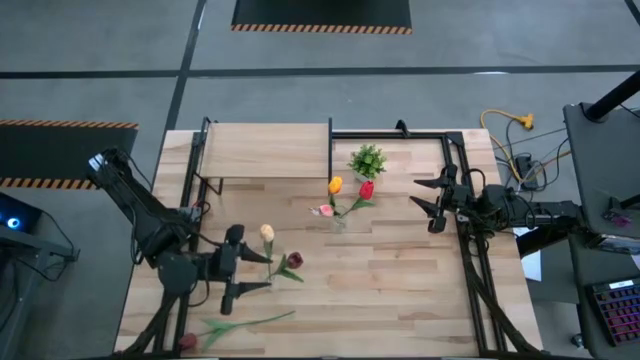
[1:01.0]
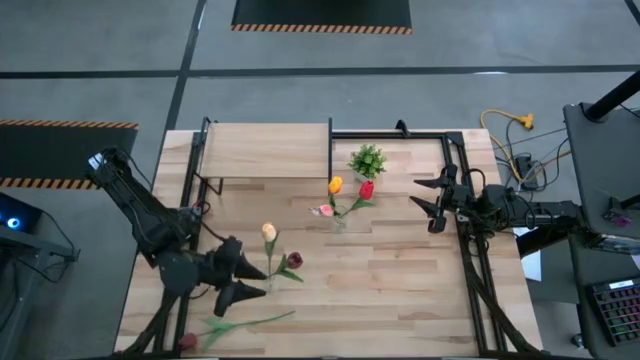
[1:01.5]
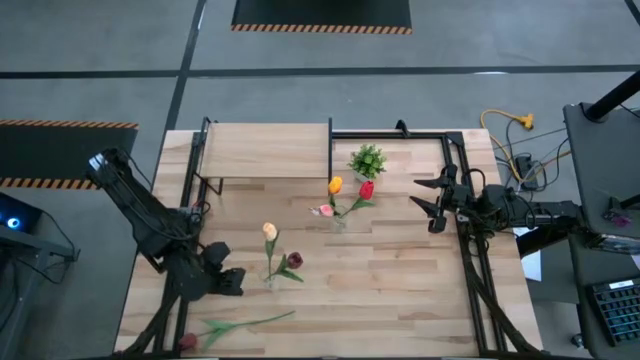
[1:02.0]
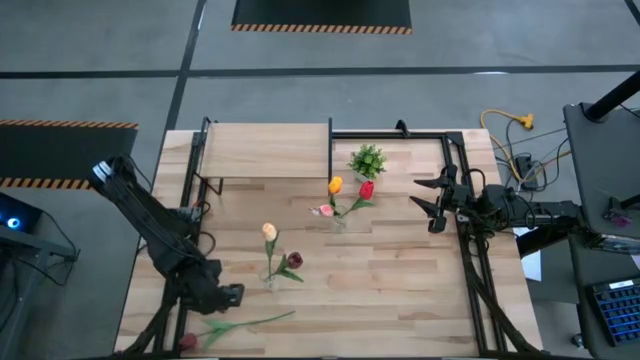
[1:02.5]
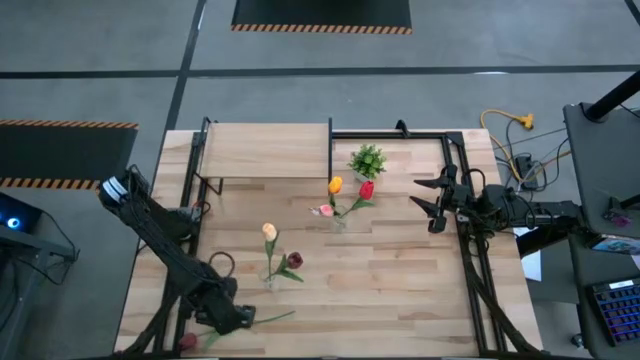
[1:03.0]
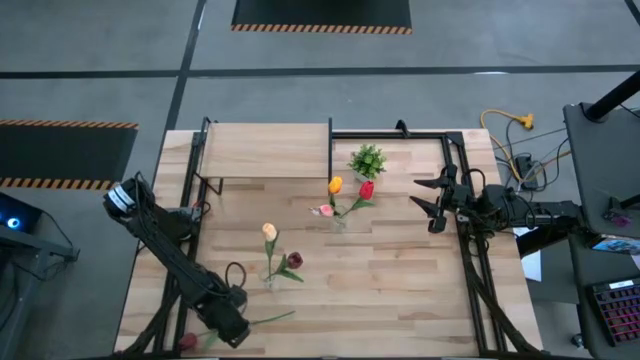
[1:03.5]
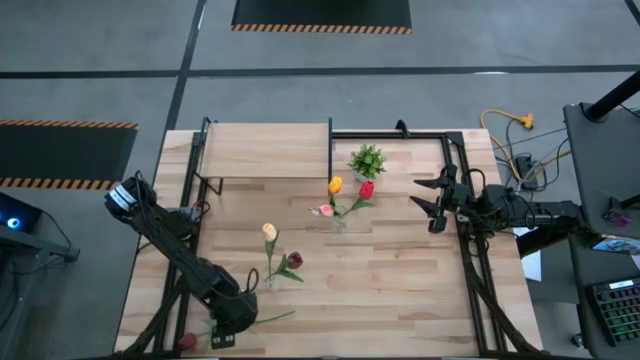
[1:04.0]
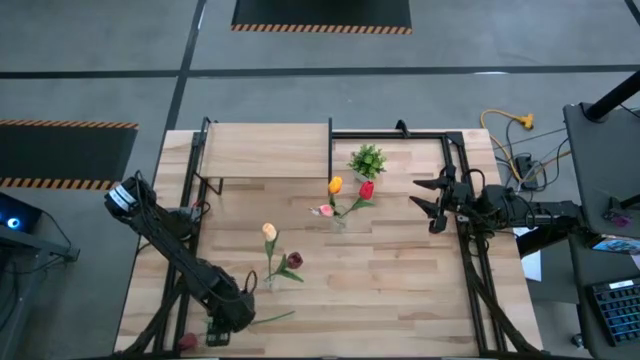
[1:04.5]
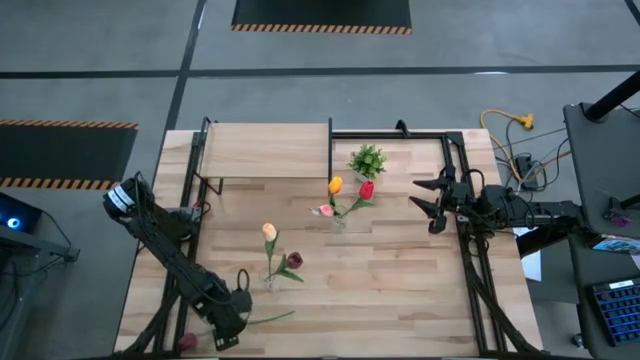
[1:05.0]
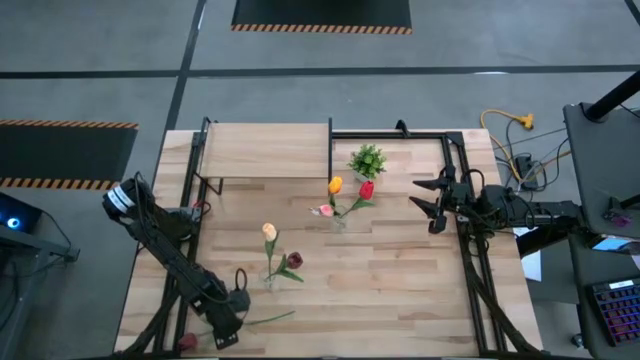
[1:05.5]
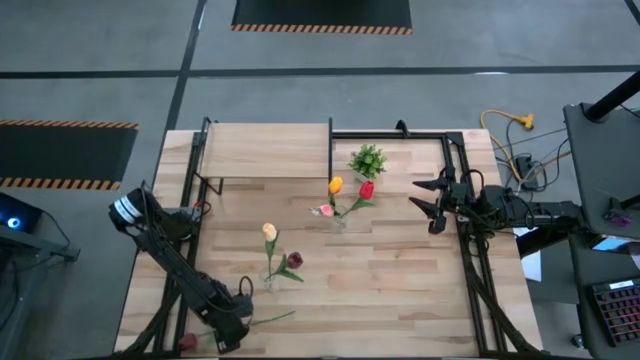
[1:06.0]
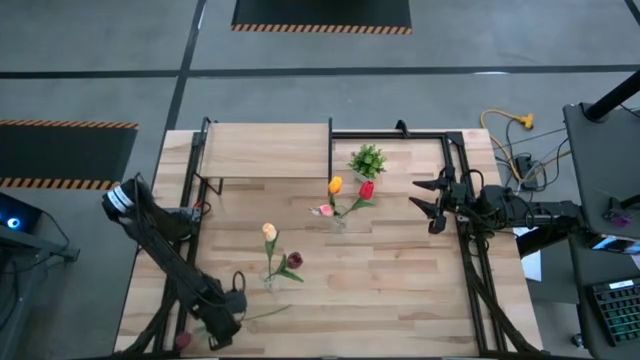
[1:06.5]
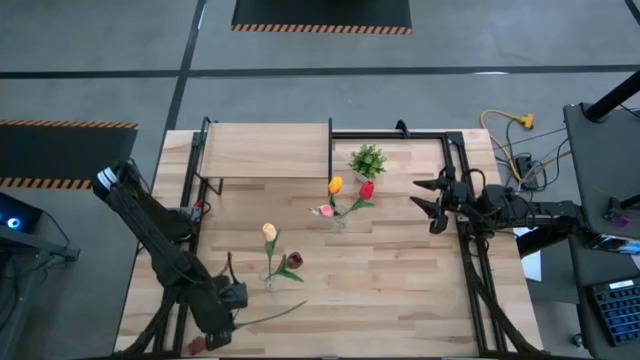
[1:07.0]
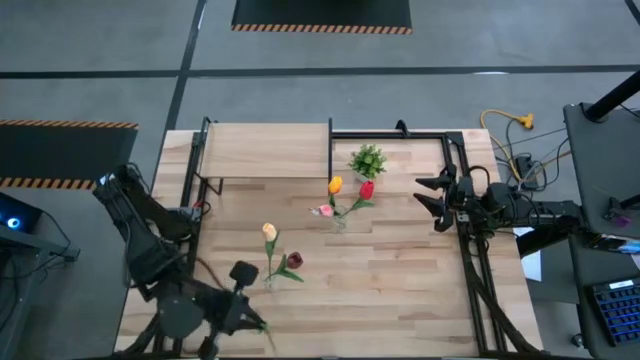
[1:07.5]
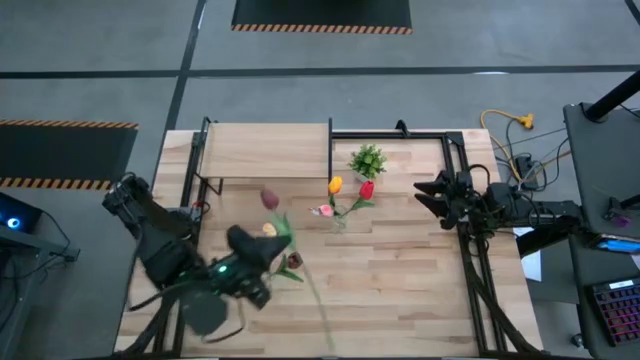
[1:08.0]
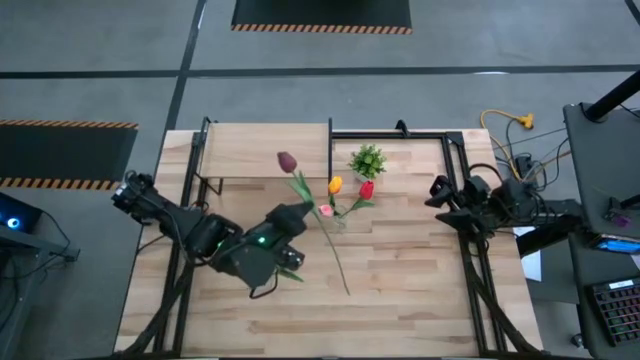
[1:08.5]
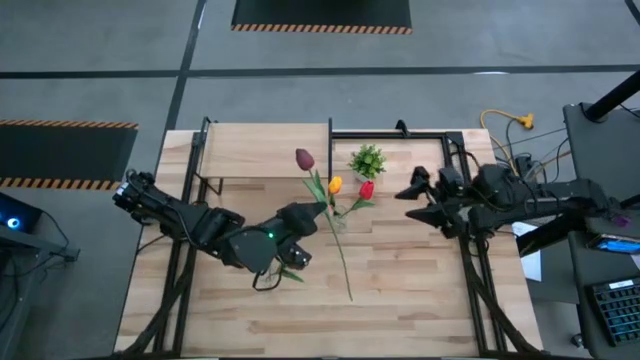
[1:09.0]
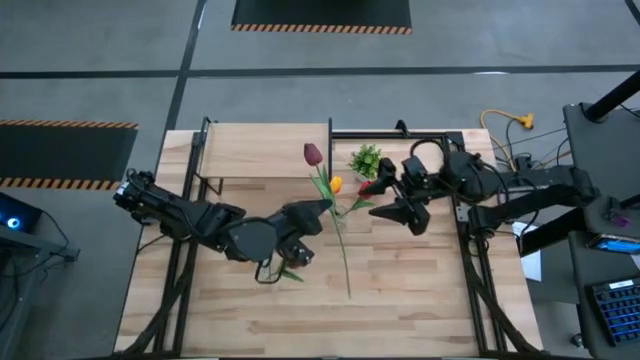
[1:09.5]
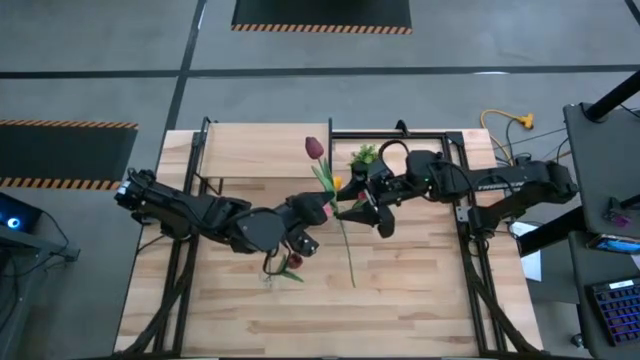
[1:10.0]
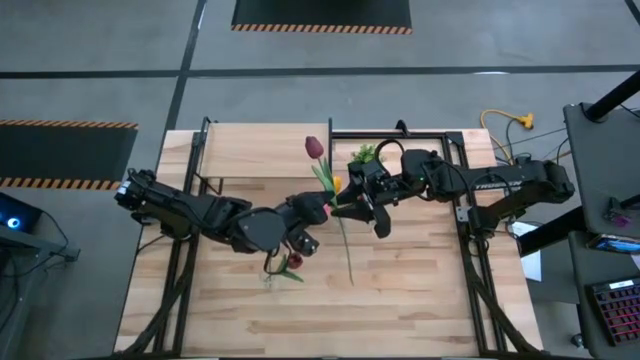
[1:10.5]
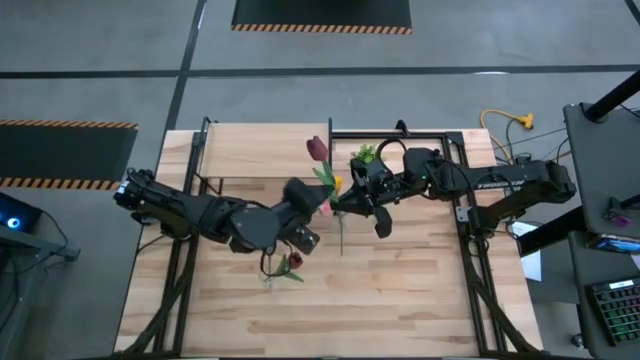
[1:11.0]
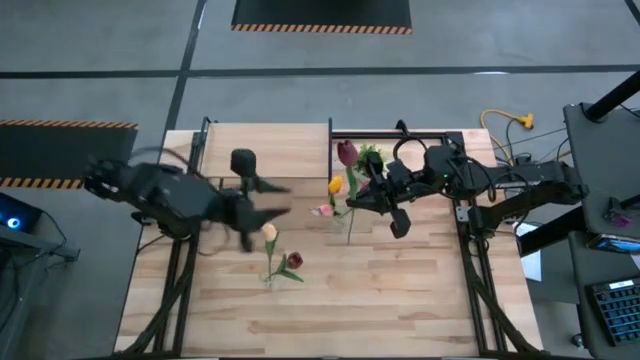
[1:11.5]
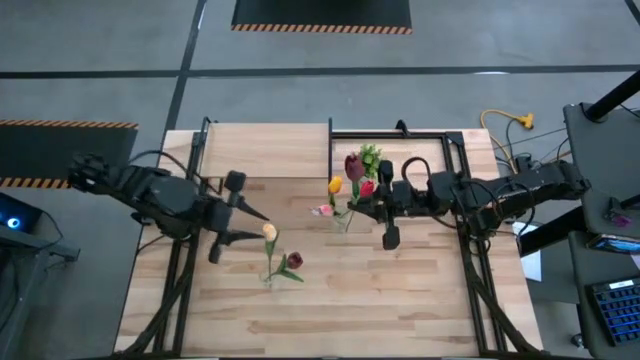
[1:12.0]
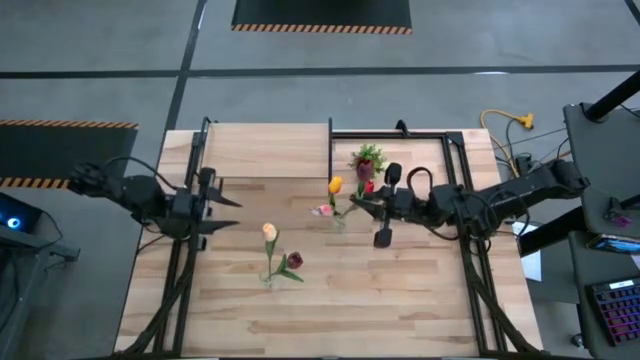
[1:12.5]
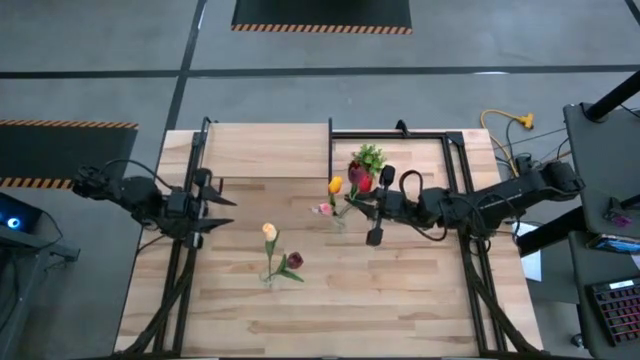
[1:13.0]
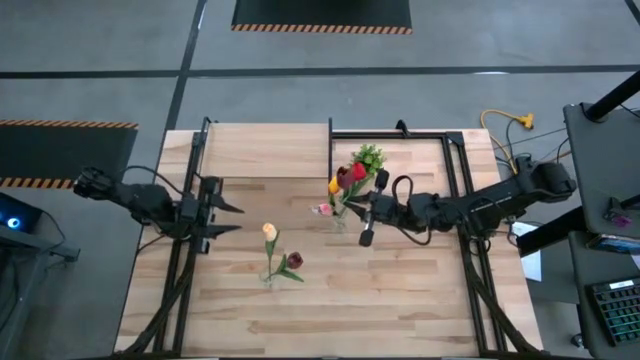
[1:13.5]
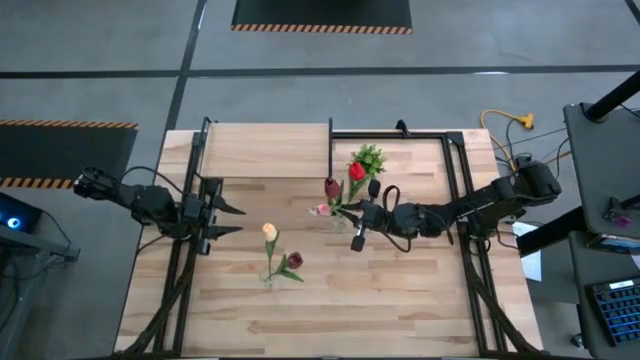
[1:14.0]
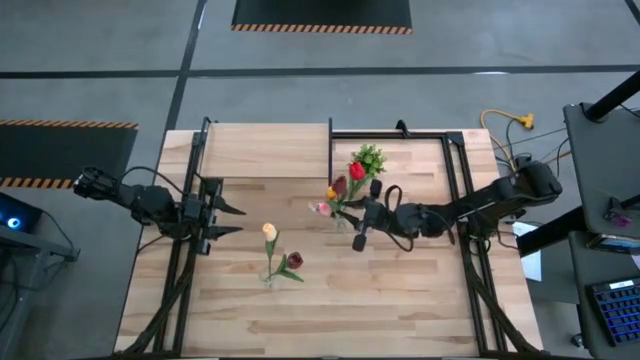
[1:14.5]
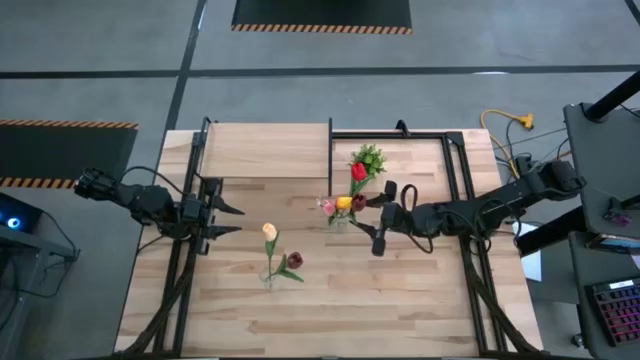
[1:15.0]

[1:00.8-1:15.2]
Task: Pick and place flowers into a vace then onto a shelf
Put the dark red tulip into the top transparent flower vase

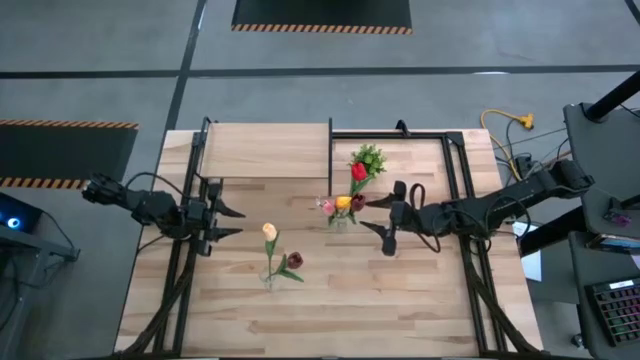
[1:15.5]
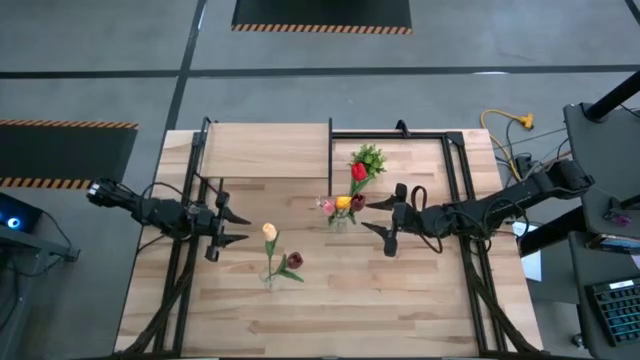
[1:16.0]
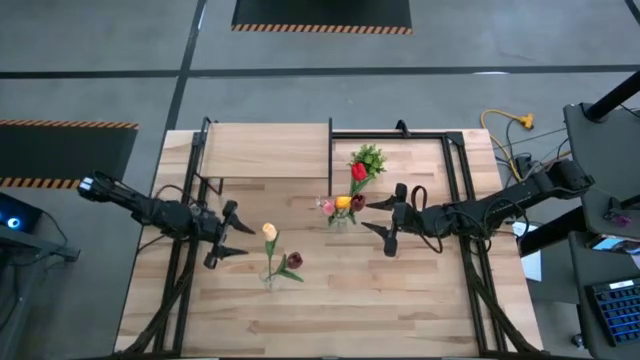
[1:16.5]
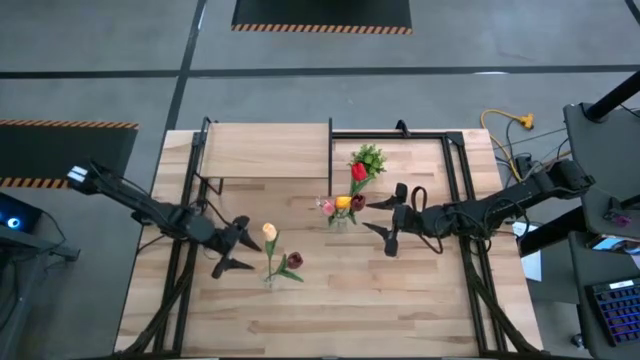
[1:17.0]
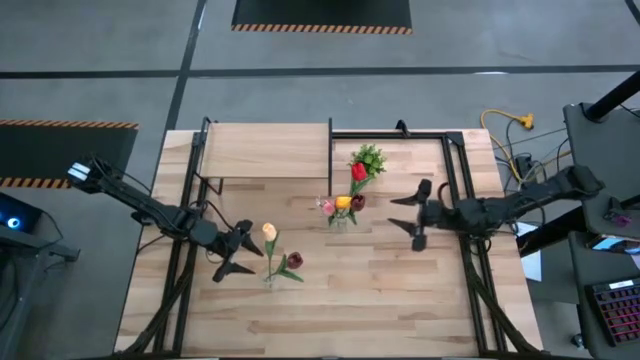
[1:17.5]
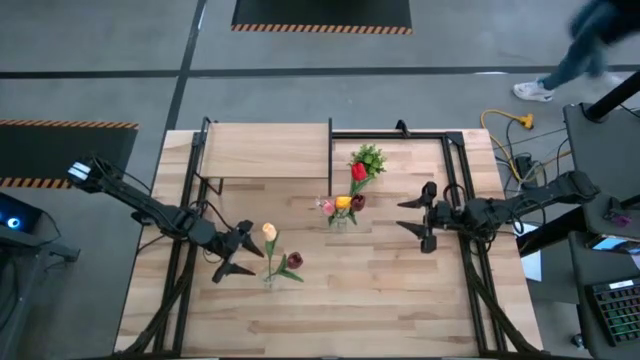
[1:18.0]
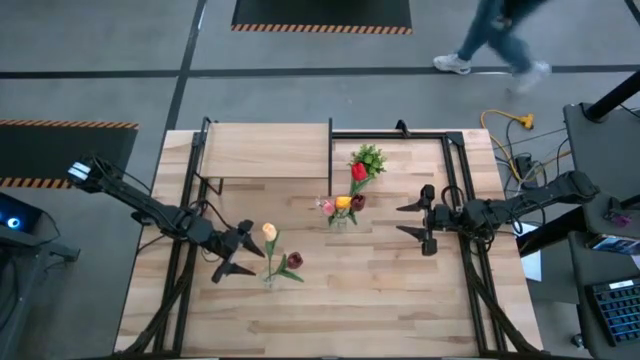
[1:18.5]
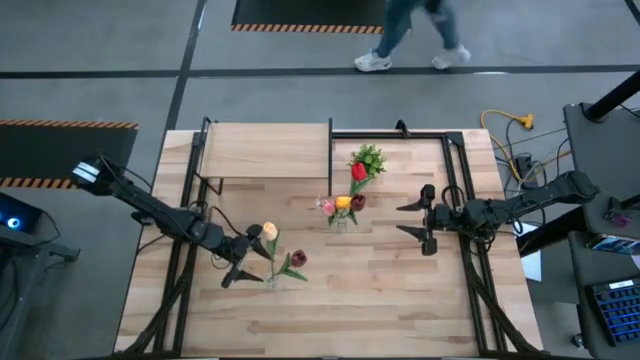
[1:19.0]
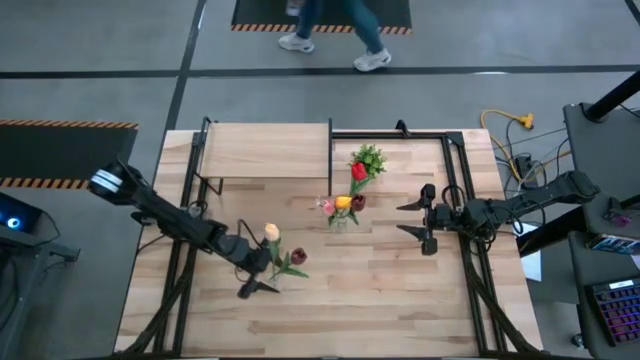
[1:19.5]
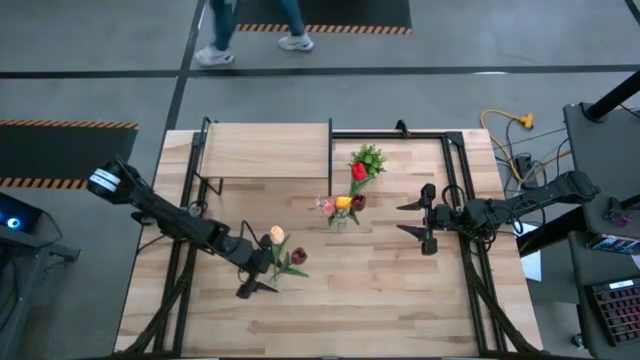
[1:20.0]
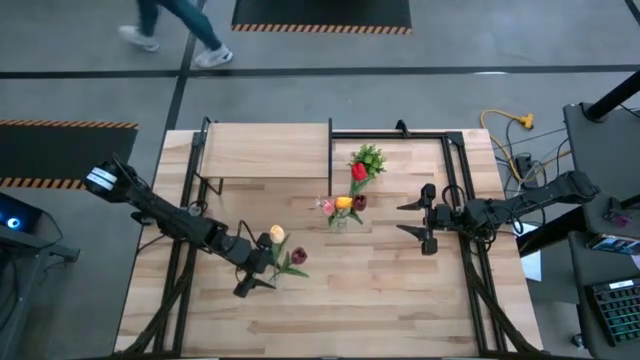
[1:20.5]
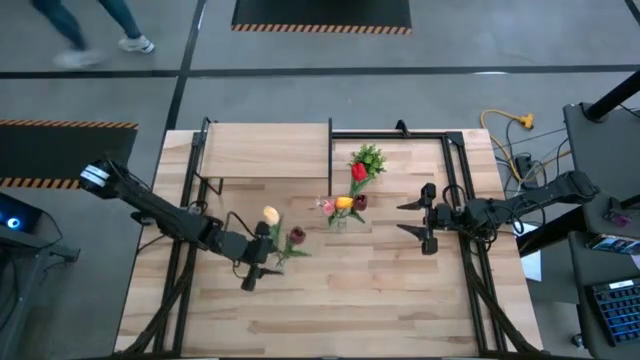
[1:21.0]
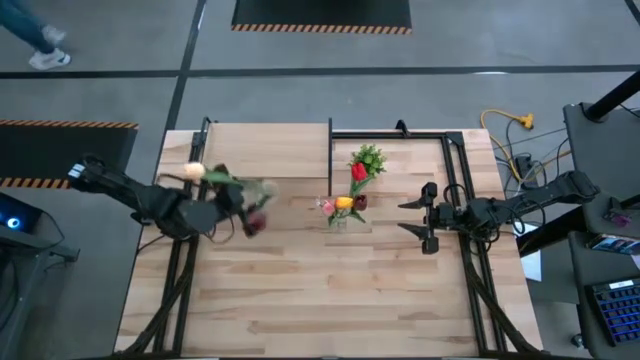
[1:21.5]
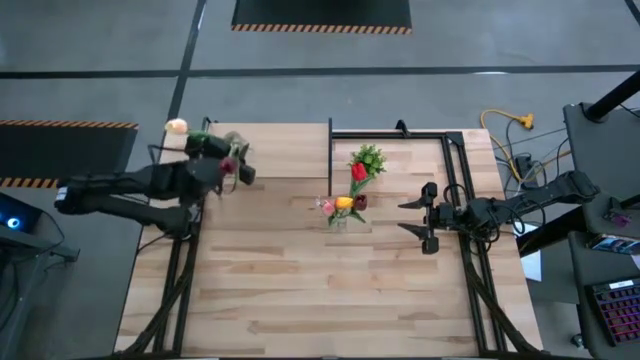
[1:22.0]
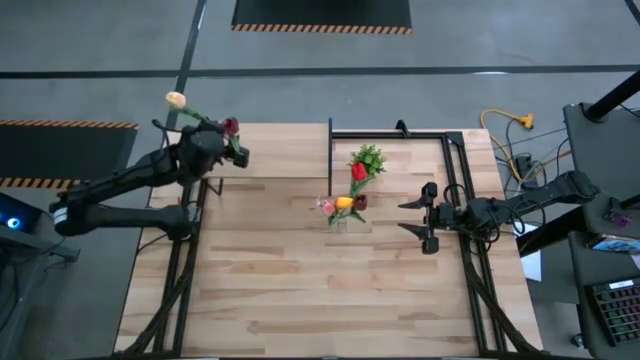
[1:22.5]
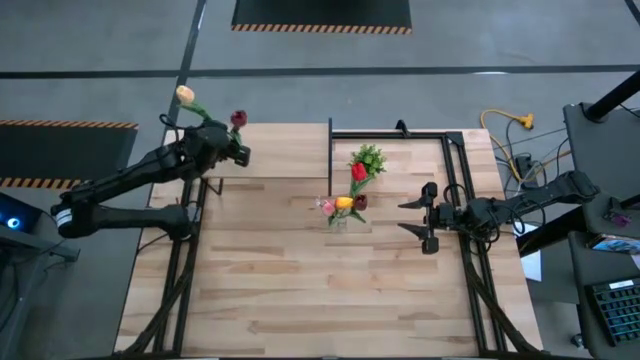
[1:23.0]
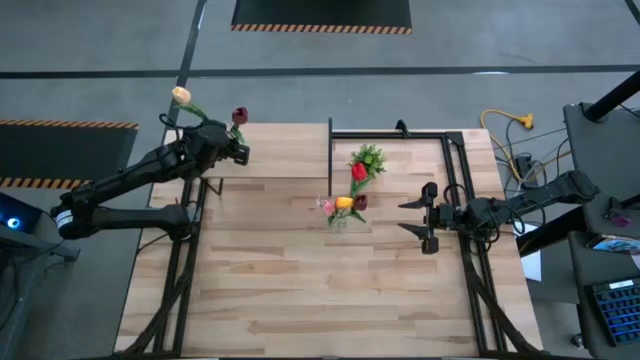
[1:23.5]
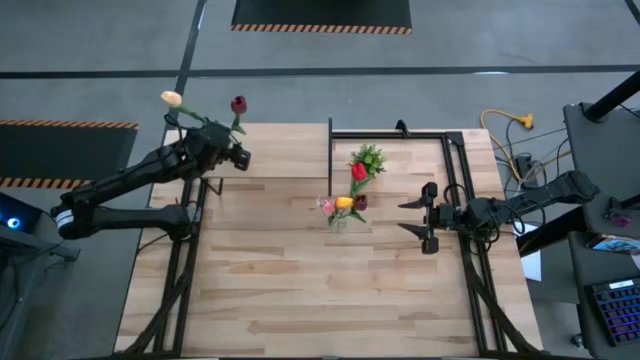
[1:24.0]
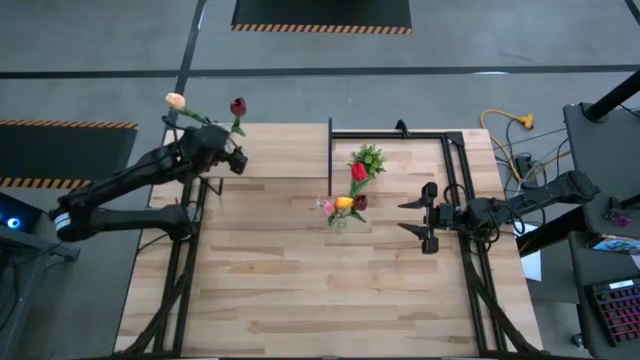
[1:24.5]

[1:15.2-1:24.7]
Stack the bottom transparent flower vase on the shelf
